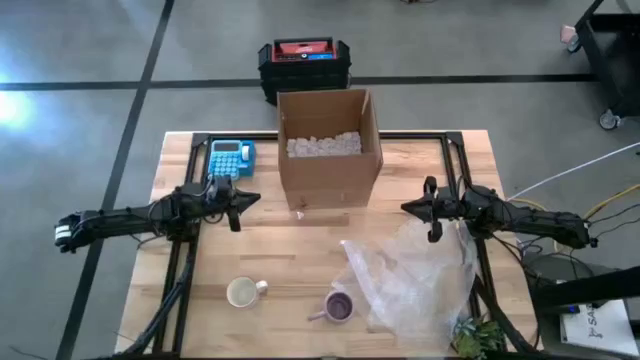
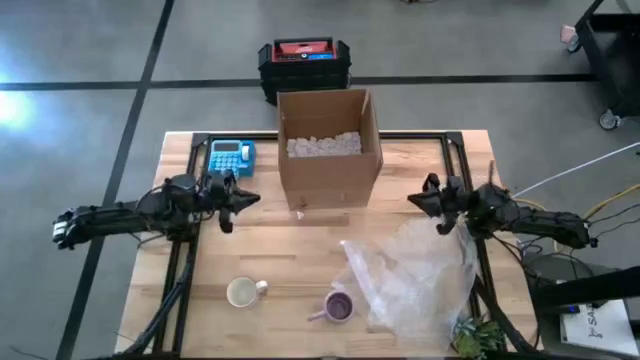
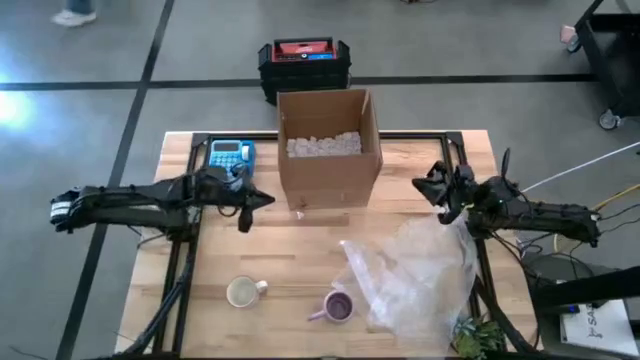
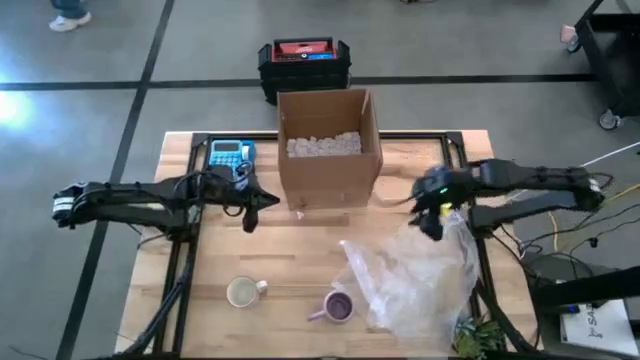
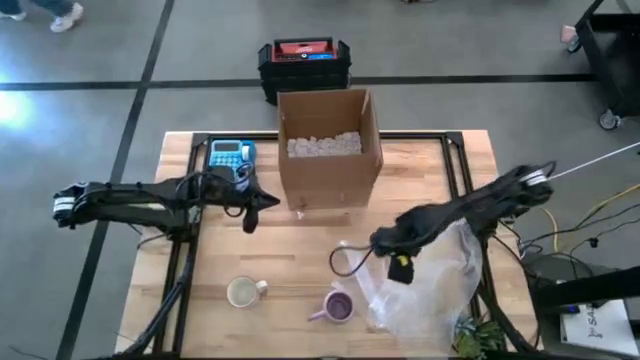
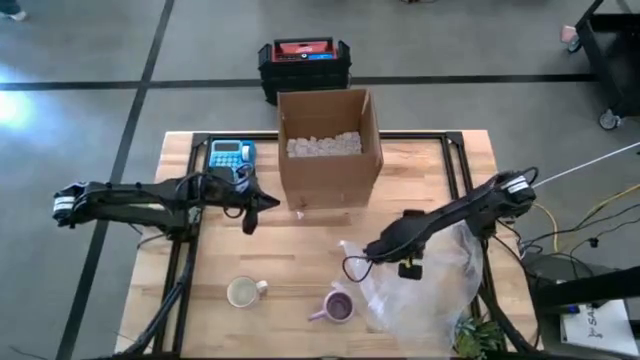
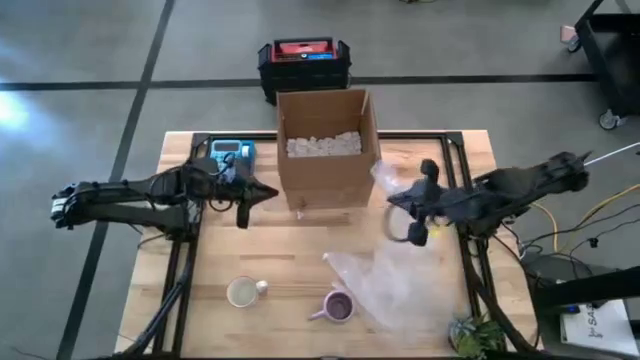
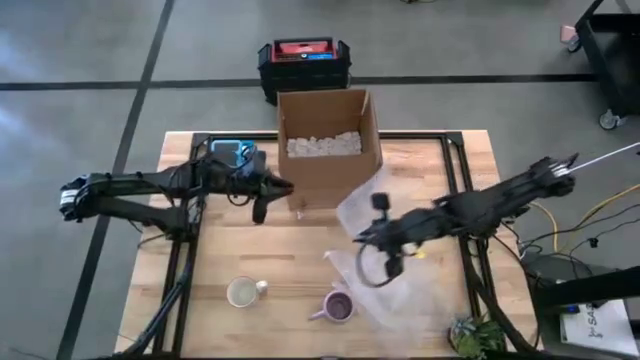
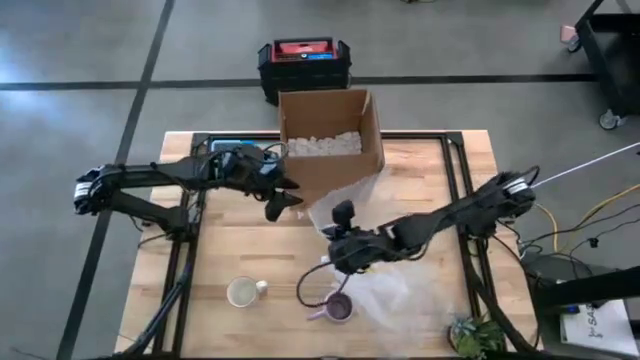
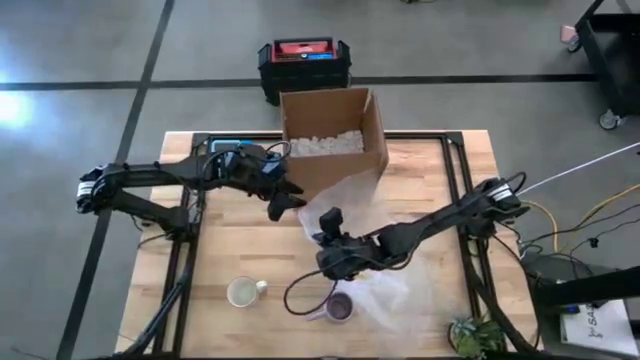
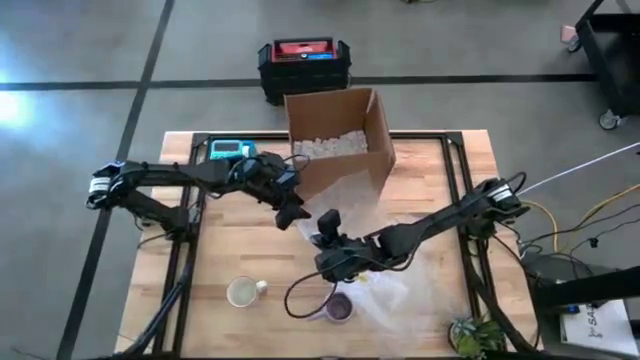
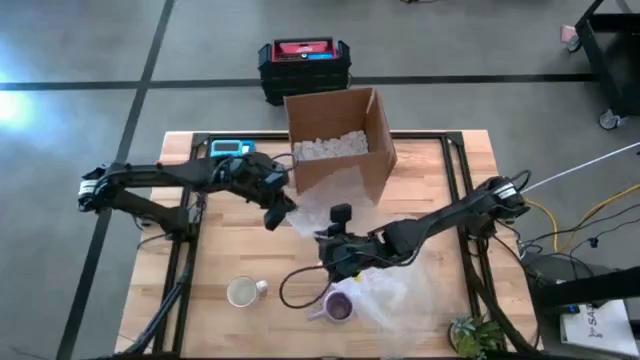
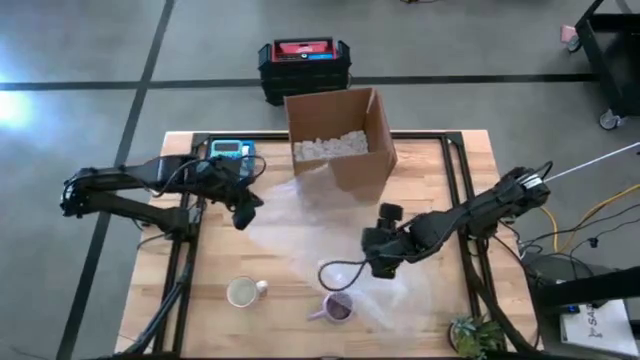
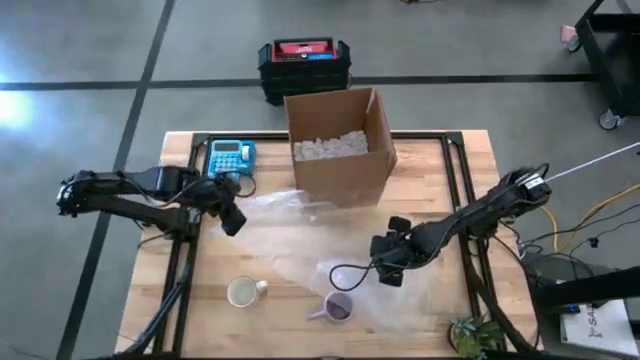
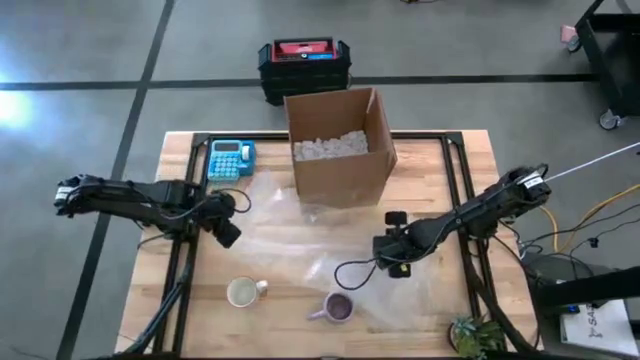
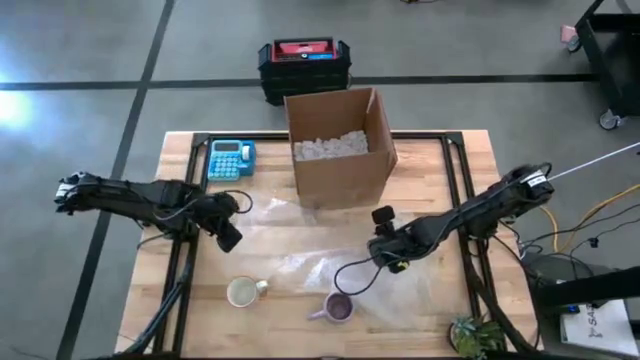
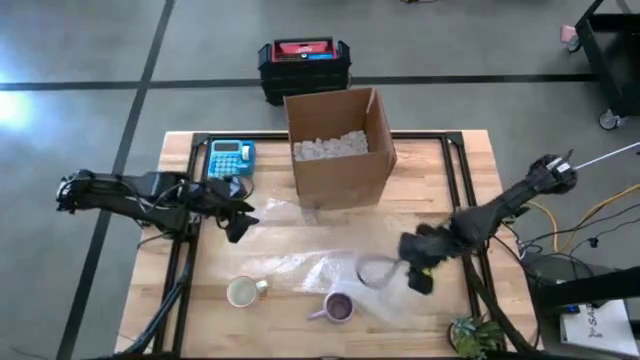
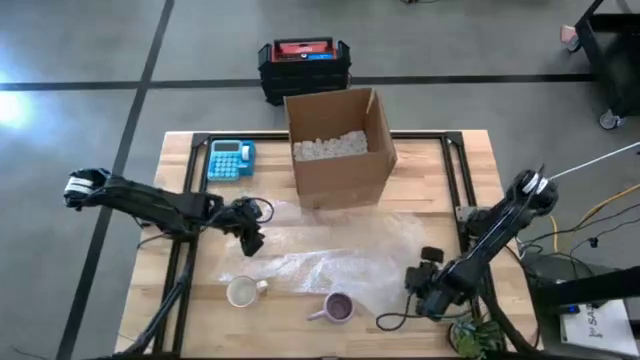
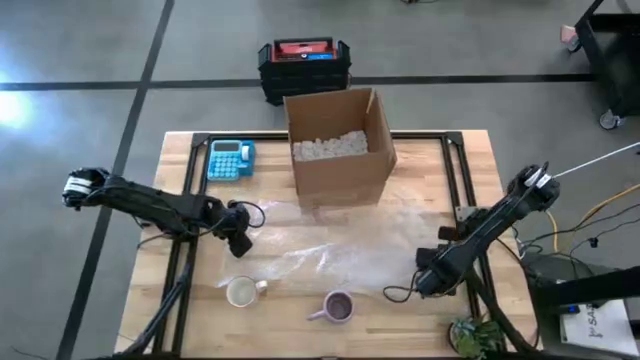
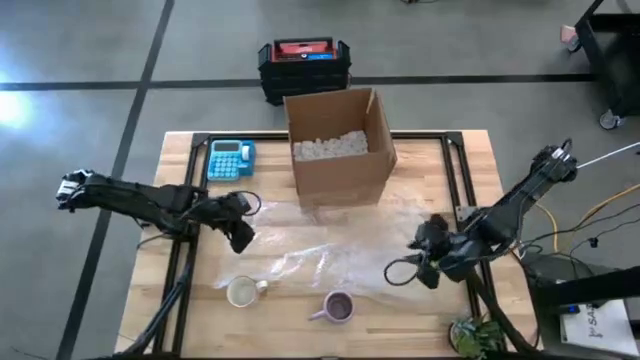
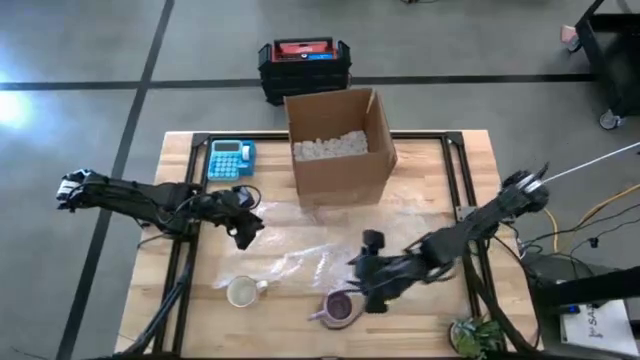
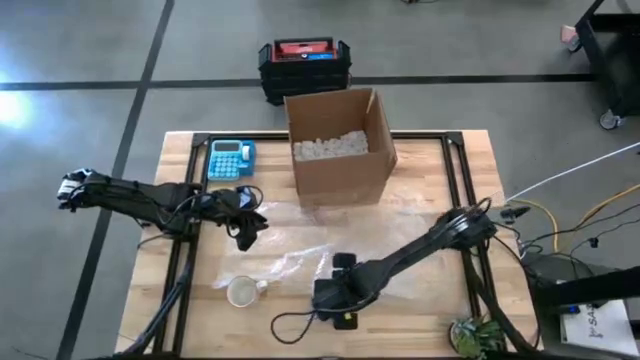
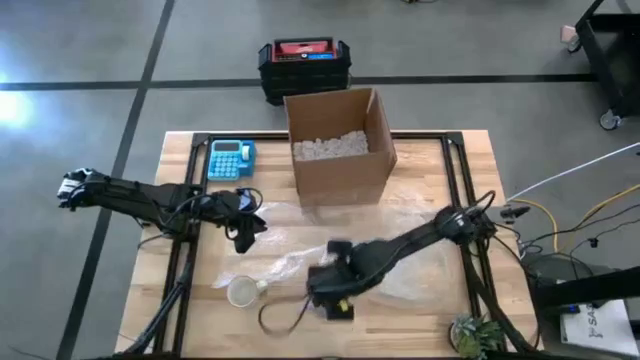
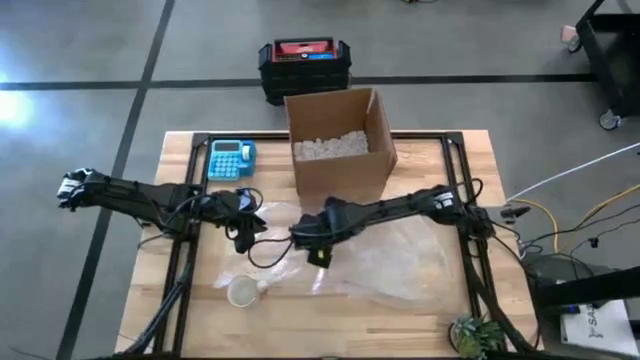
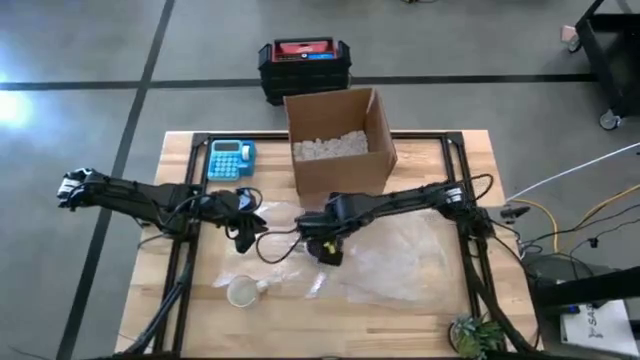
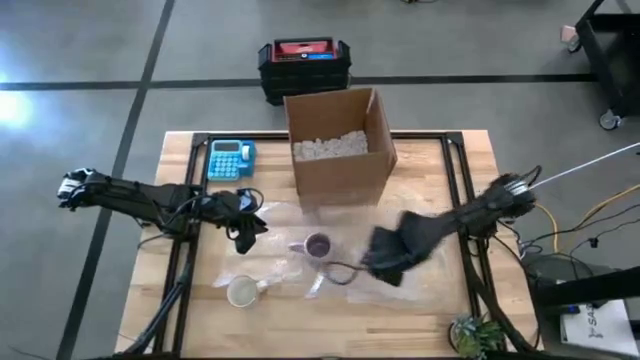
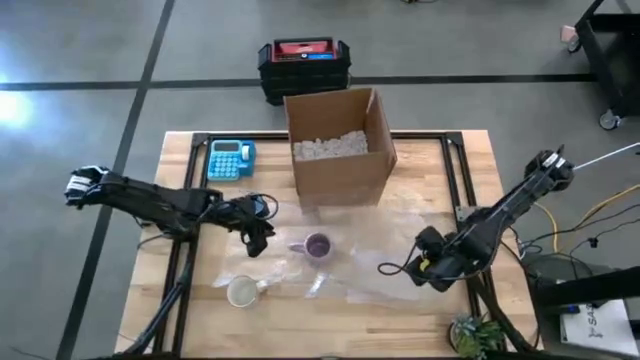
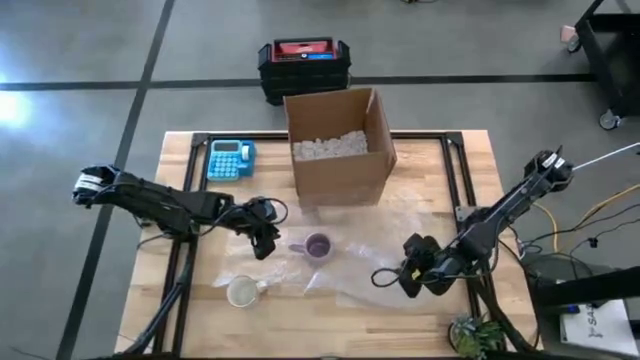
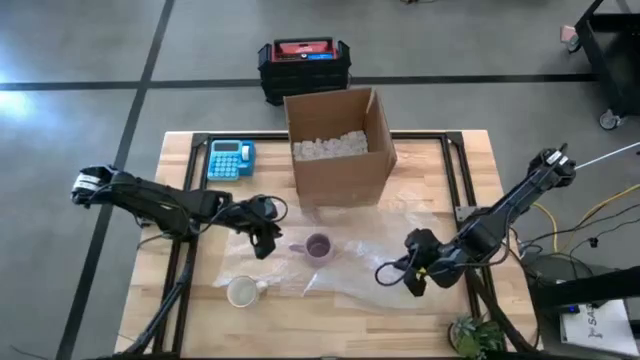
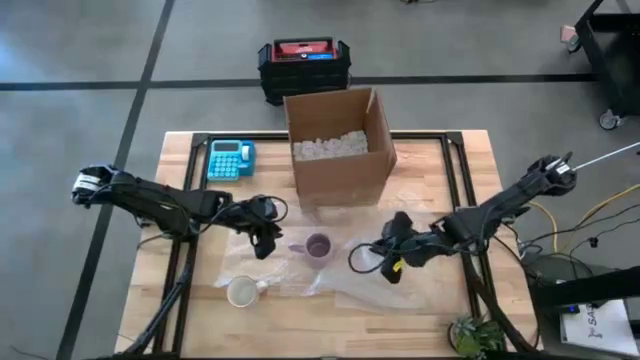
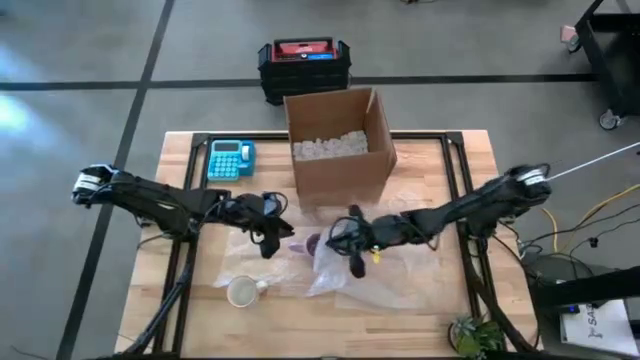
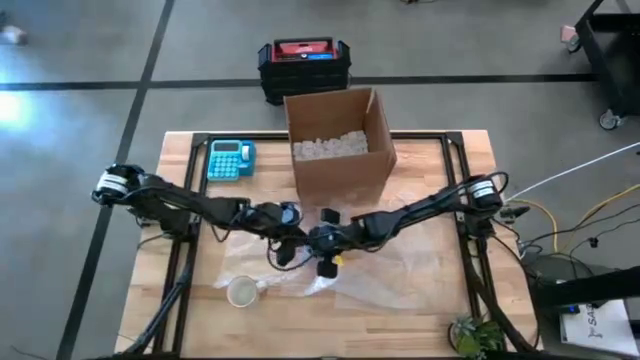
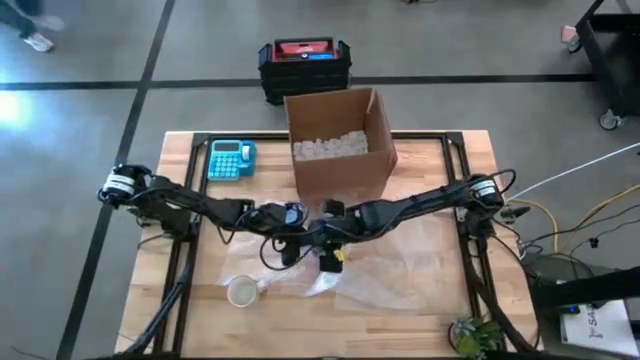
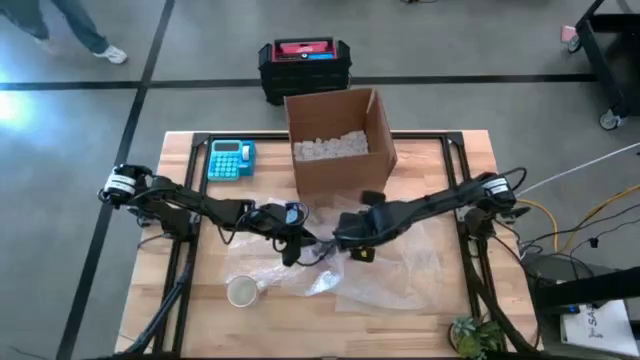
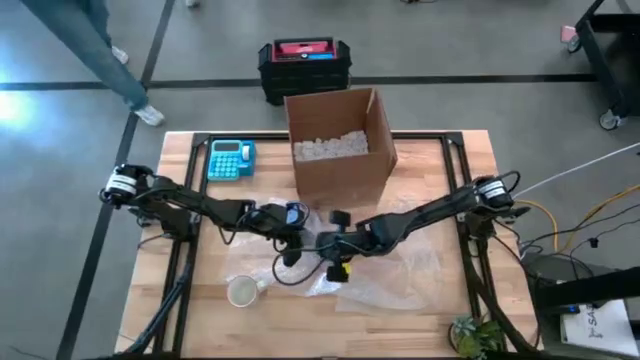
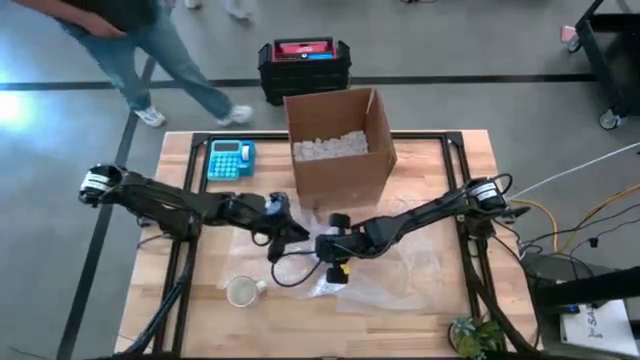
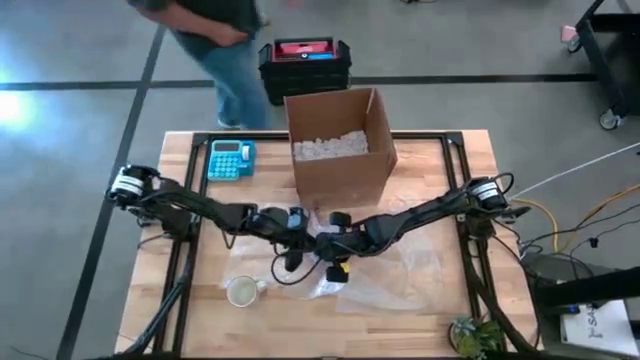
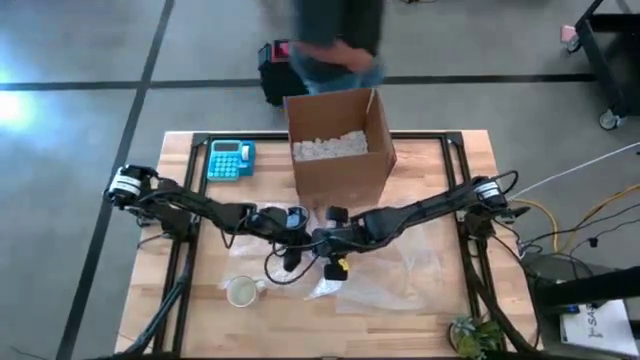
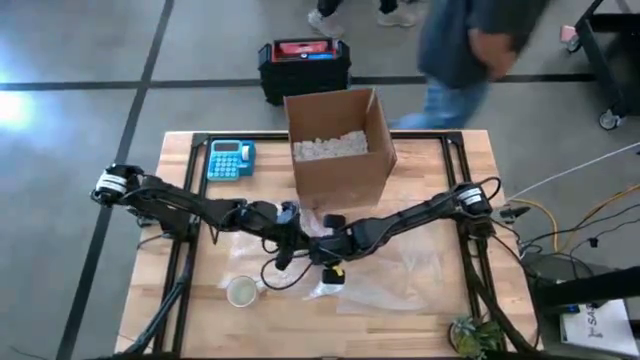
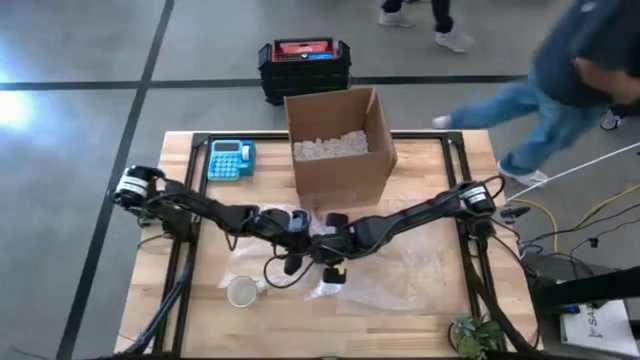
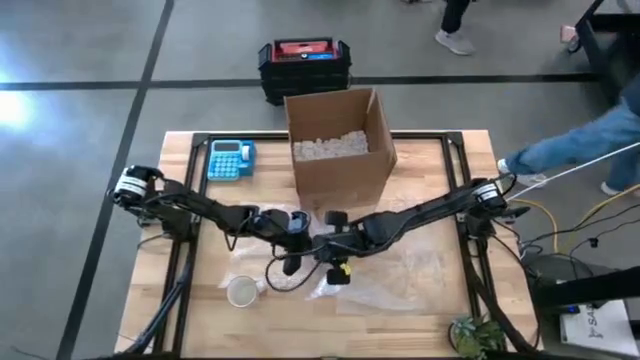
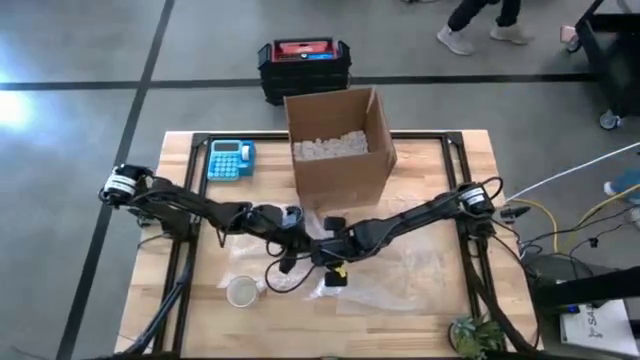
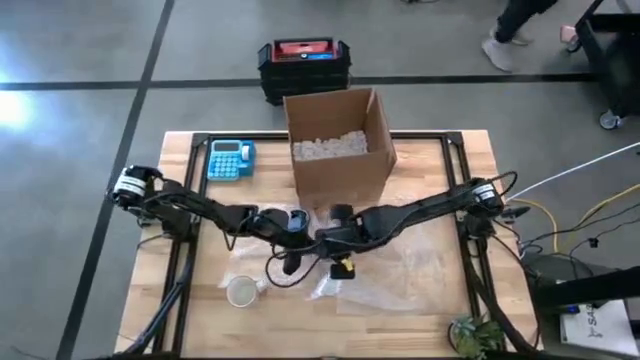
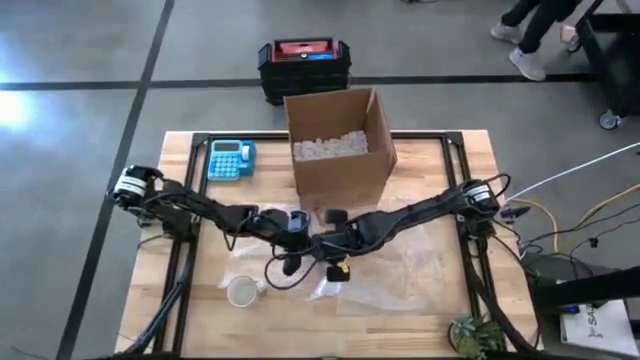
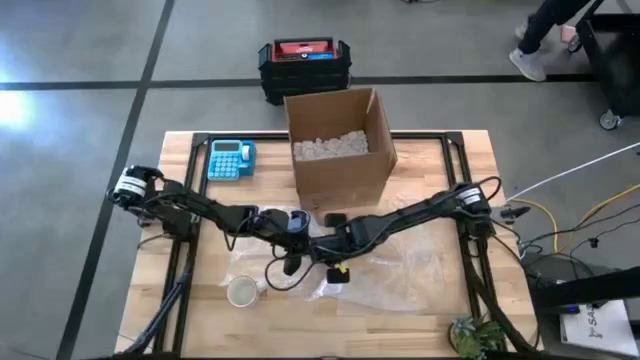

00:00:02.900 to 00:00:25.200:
Task: wrap mug
Wrap the purple mug with bubble wrap
